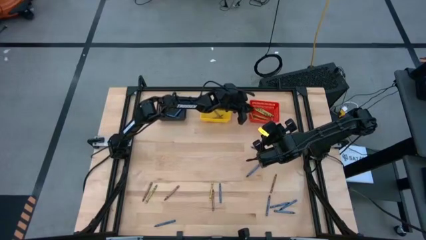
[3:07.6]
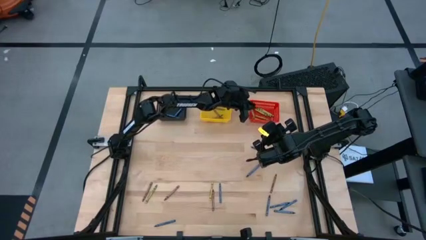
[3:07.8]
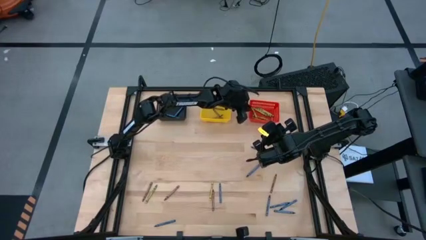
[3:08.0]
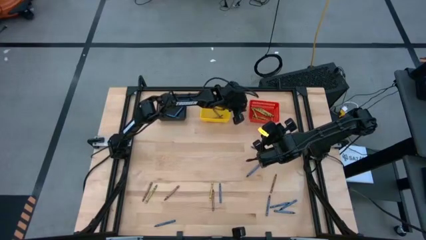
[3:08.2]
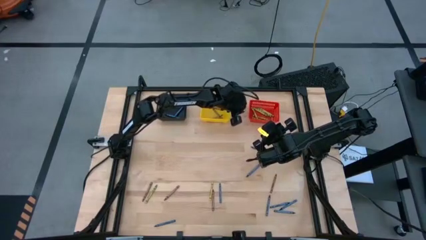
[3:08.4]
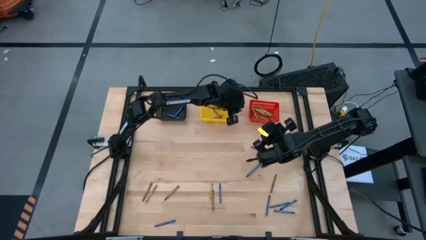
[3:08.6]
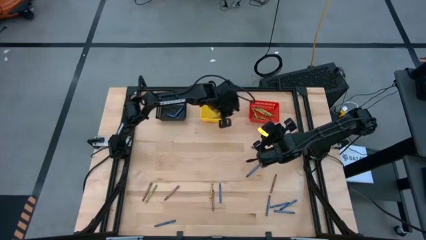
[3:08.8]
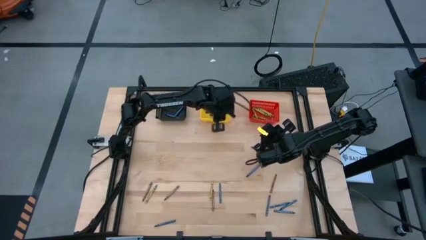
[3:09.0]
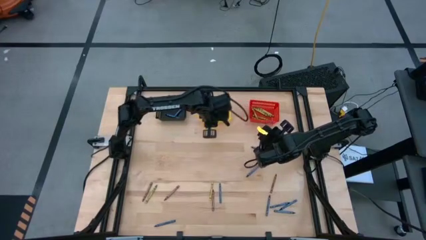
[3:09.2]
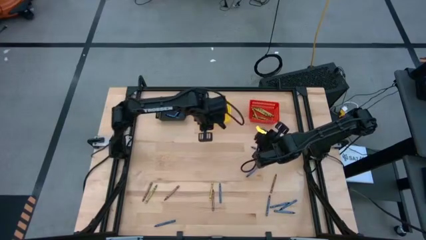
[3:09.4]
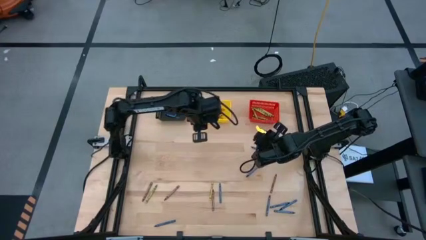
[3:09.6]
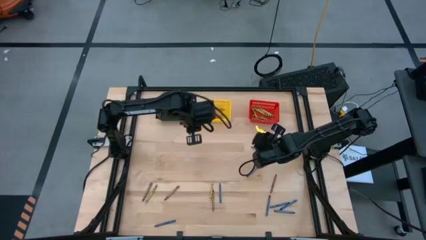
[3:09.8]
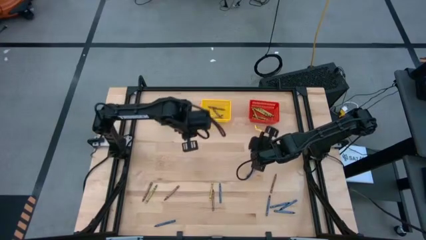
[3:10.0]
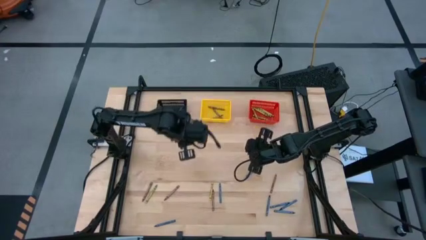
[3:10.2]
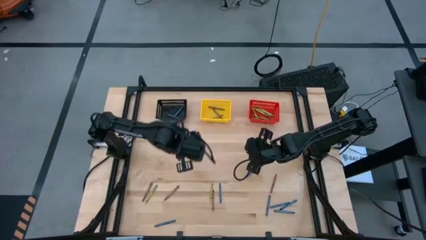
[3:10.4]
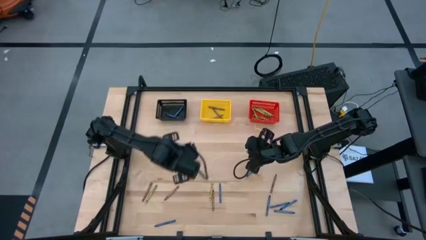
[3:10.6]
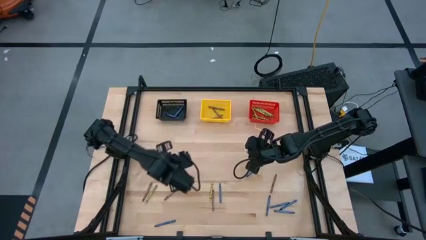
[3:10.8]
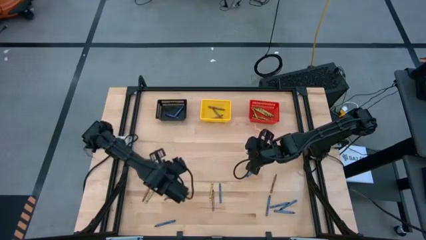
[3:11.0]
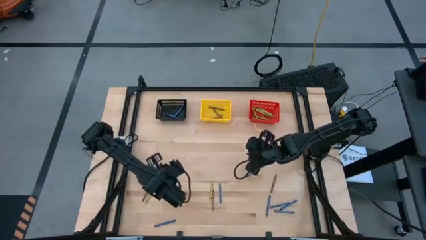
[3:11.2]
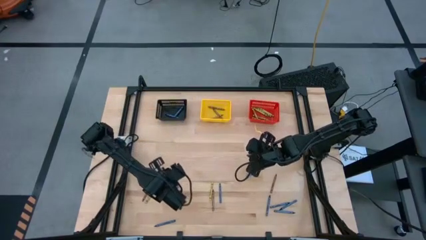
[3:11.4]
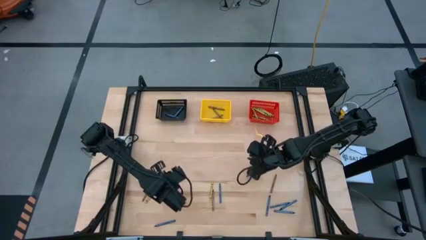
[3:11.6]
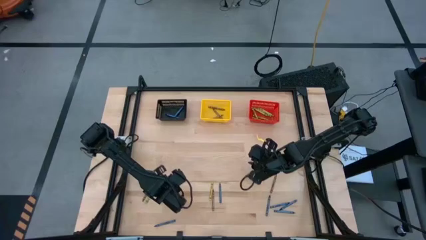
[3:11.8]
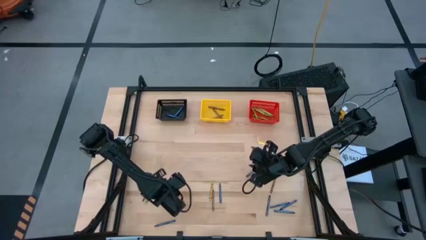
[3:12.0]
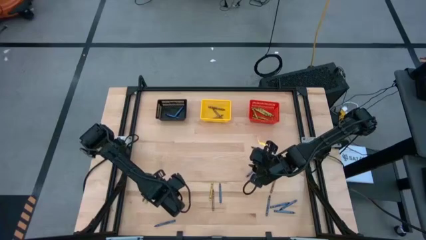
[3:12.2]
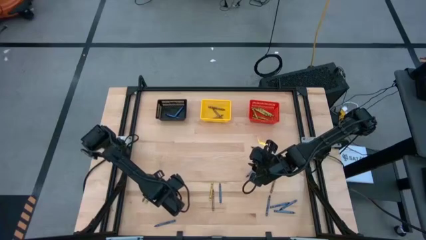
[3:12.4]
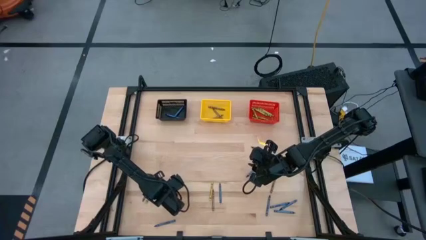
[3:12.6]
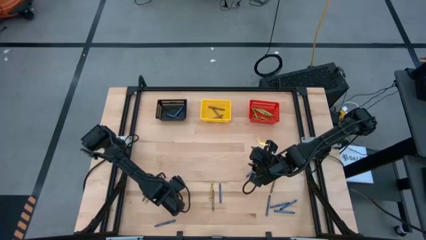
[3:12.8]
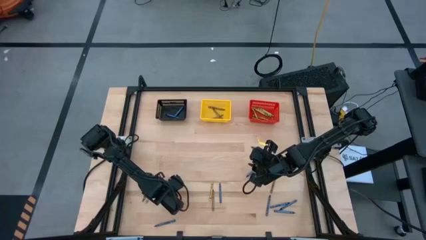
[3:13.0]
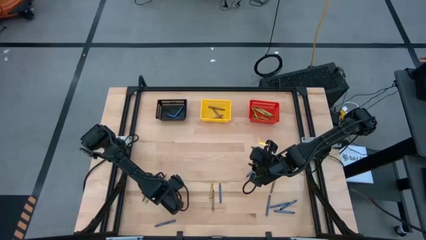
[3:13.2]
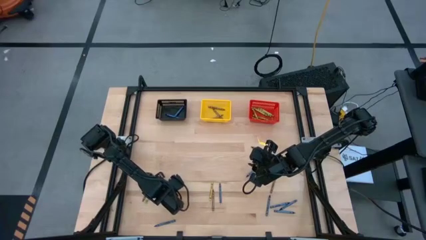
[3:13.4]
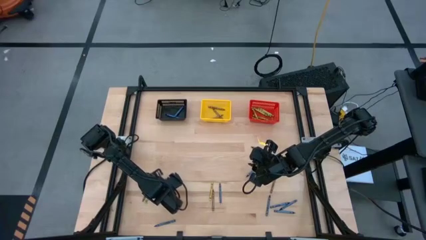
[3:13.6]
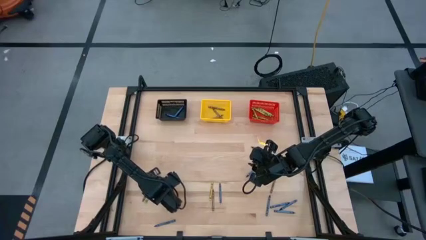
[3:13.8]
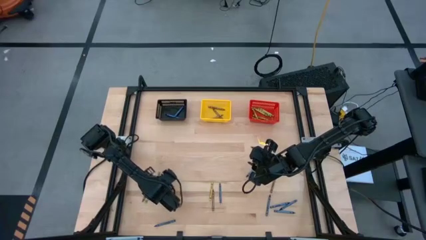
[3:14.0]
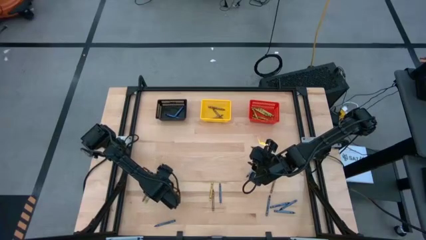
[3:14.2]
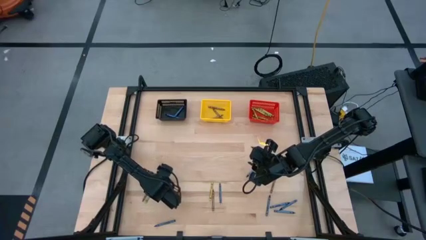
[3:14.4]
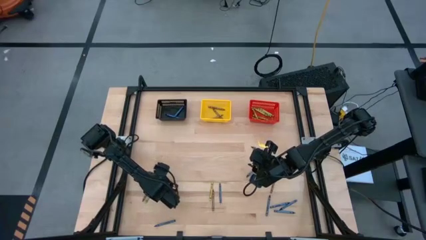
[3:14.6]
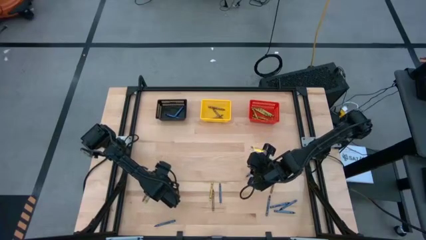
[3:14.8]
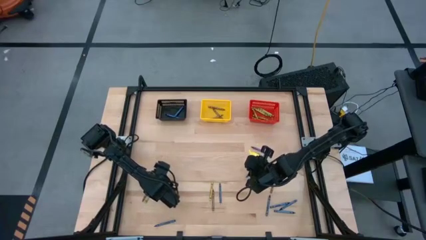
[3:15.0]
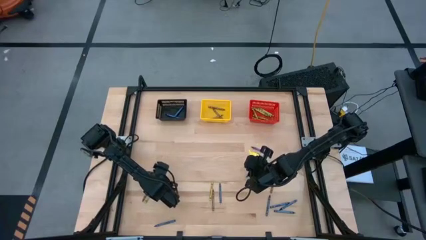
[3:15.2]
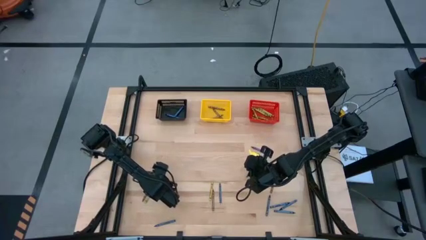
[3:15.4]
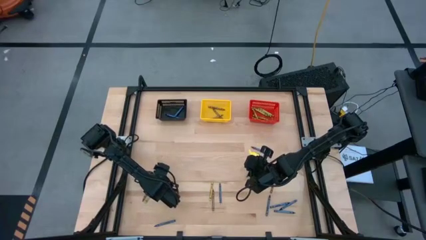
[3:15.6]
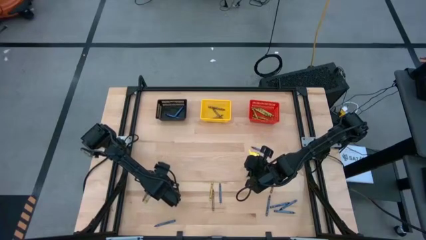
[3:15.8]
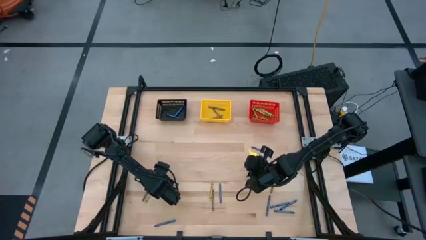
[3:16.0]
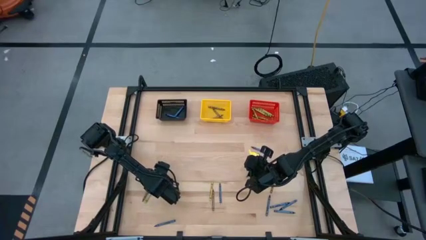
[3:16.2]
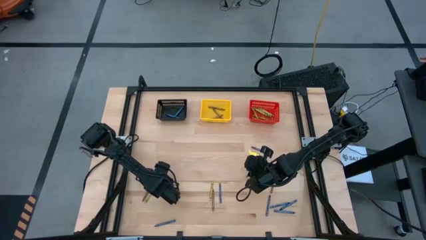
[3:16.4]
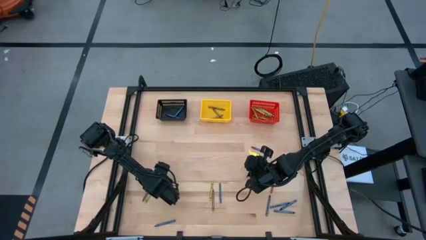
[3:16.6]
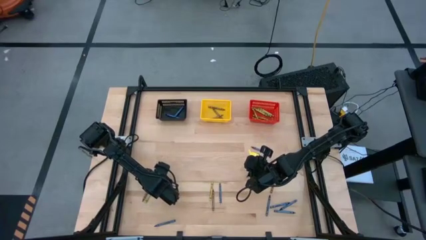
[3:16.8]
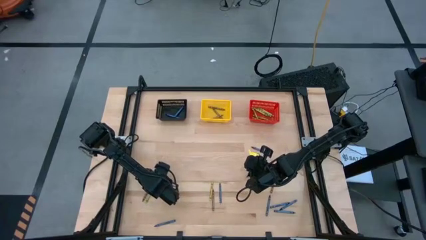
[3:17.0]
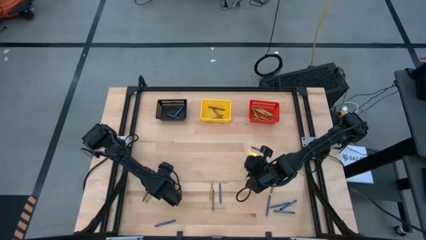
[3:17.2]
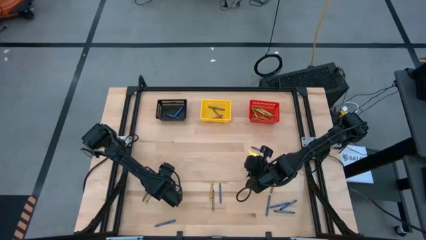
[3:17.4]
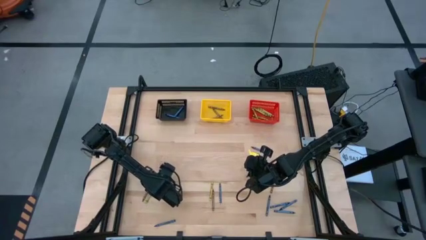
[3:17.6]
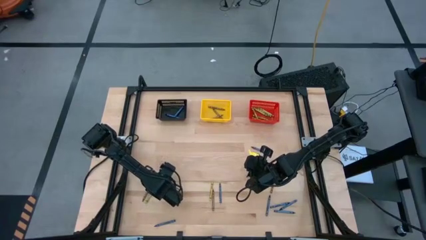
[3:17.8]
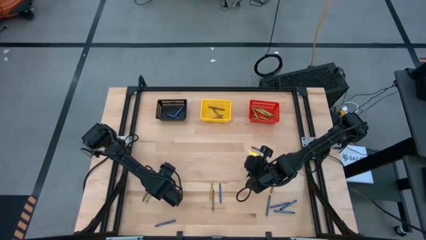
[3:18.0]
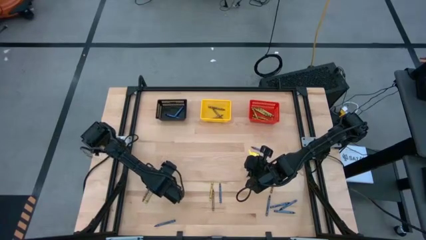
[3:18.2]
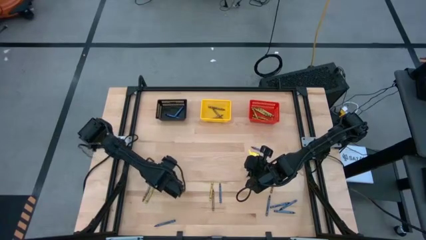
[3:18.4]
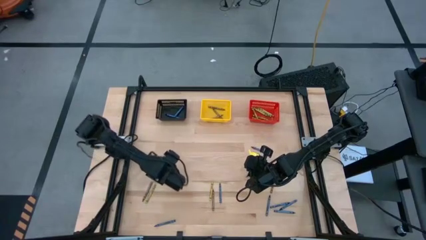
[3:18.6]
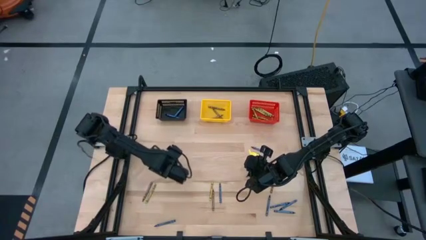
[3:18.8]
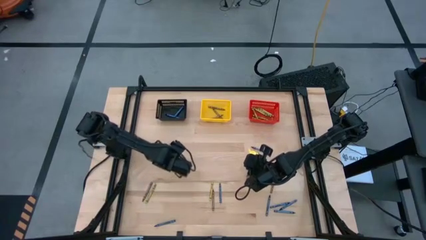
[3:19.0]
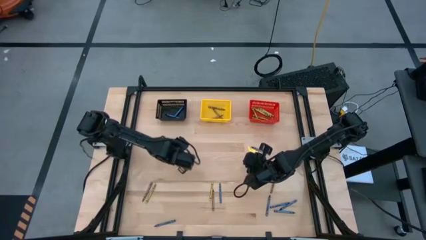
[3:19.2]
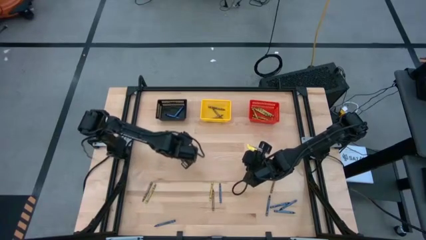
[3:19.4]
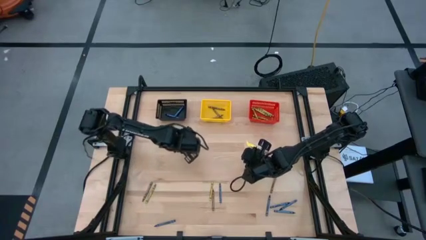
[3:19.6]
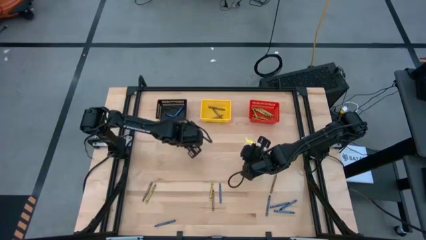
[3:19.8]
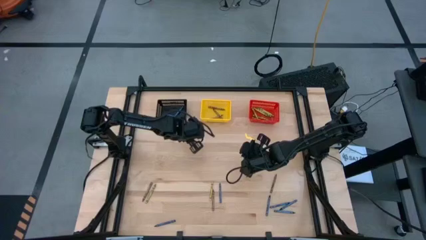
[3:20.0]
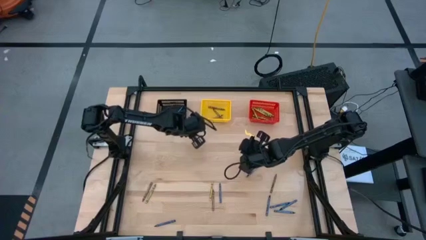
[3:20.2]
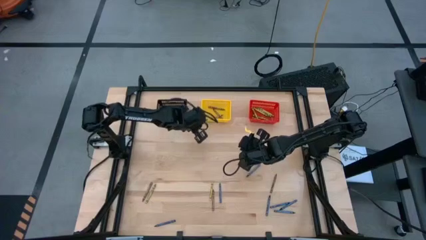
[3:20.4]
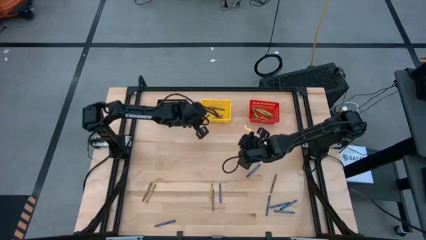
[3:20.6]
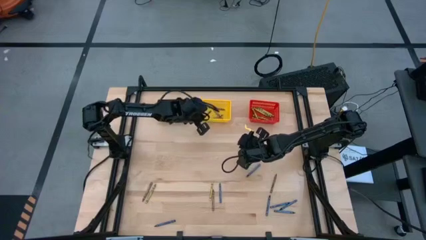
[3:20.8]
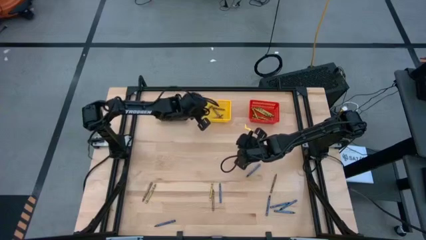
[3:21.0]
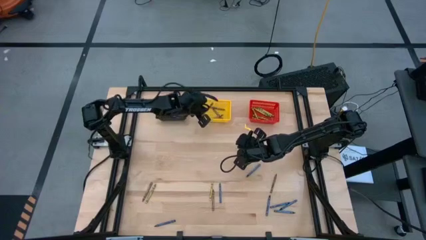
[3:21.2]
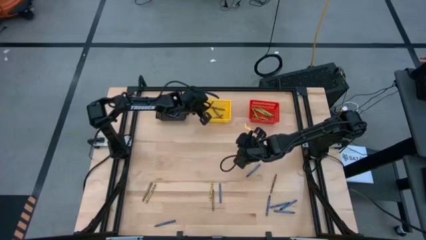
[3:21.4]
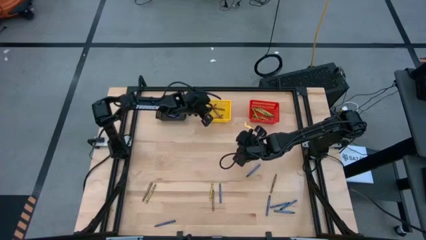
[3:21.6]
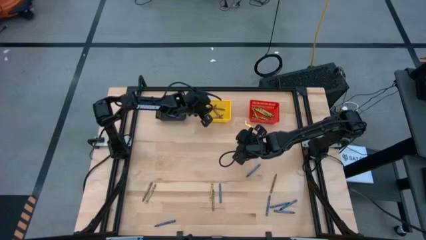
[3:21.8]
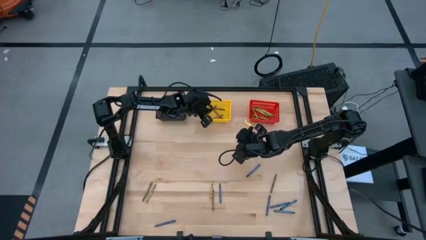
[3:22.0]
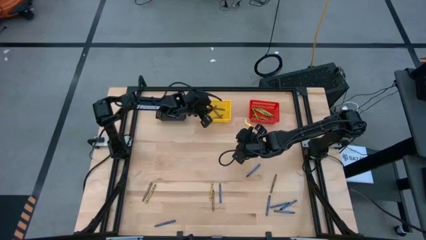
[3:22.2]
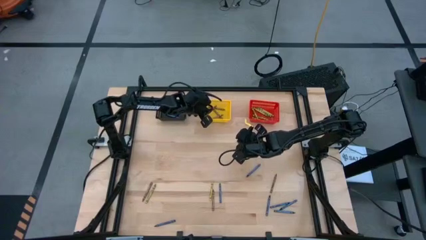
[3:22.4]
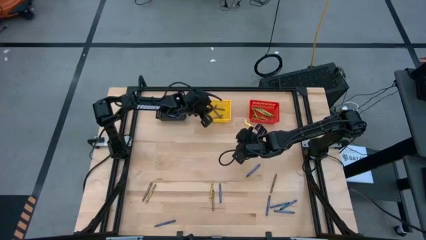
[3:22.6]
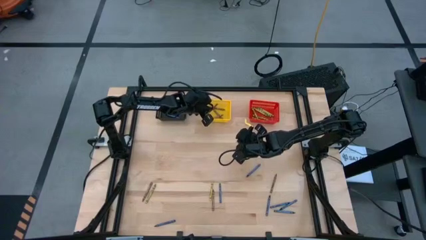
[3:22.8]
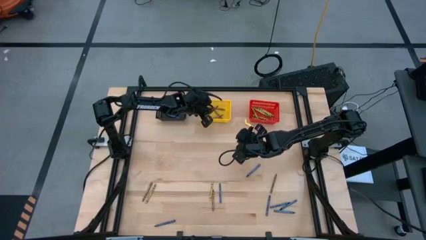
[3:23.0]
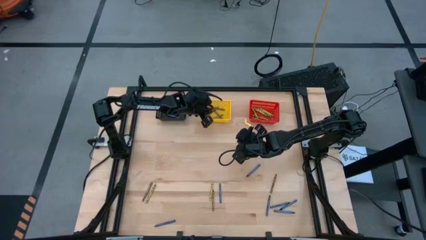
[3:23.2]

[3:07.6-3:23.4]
Task: Sort crayons
Put the brown crayon into the yellow bin

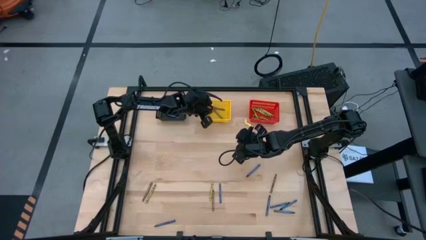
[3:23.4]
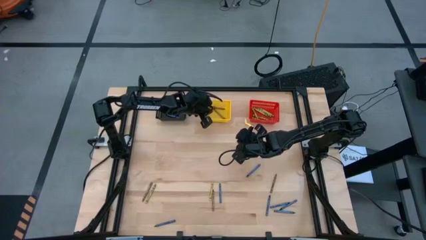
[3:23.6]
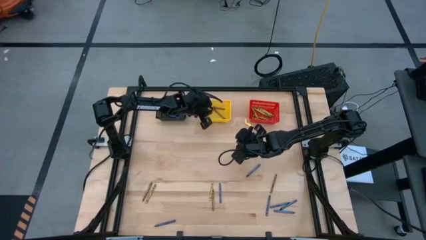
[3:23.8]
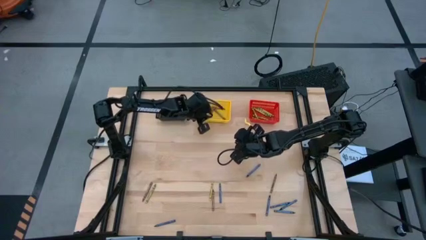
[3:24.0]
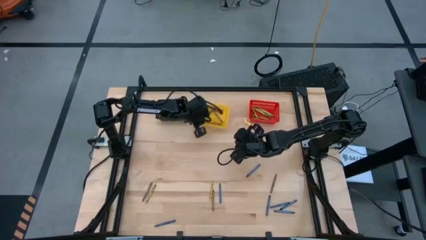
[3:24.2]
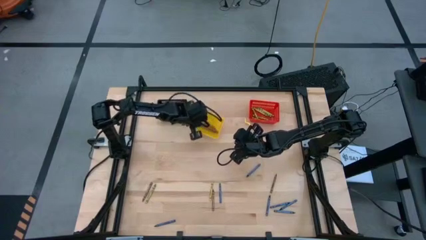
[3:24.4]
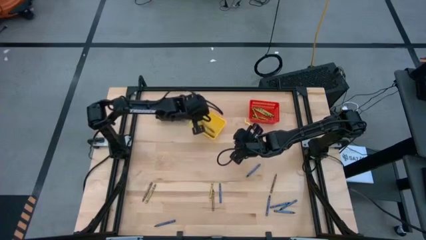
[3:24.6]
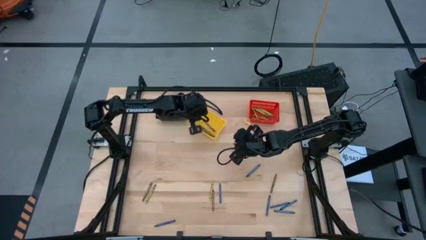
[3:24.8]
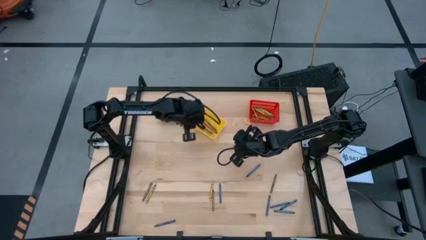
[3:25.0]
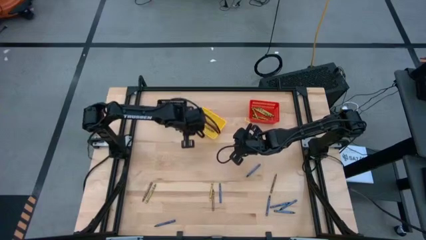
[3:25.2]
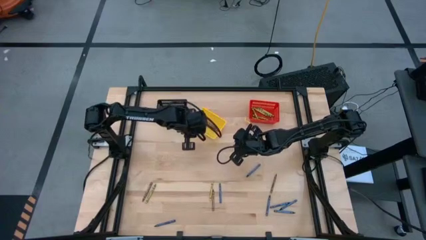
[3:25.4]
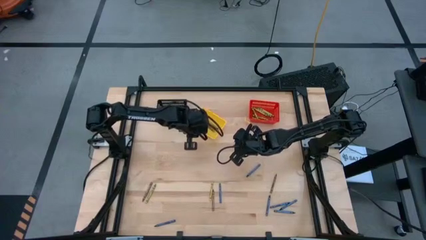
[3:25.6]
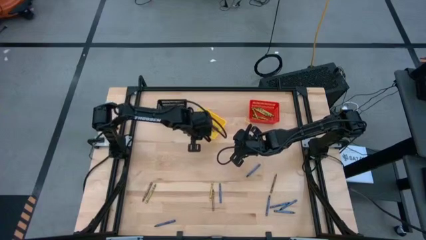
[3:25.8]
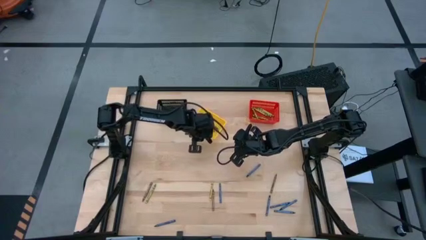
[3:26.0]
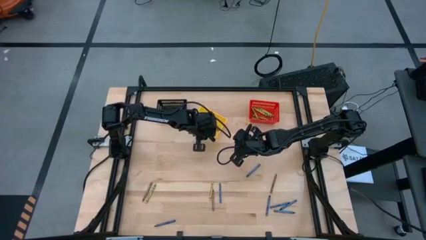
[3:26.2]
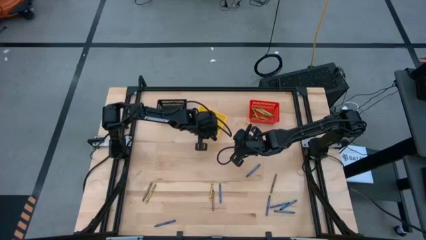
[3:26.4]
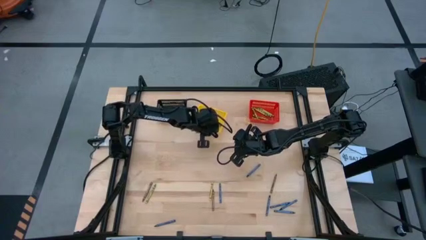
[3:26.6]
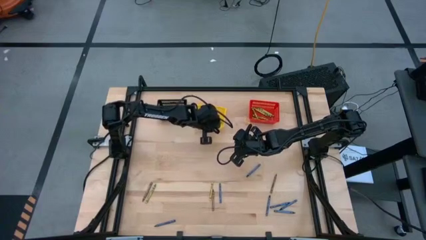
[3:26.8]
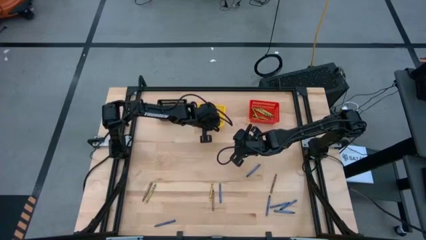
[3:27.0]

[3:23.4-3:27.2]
Adjust the yellow bin
